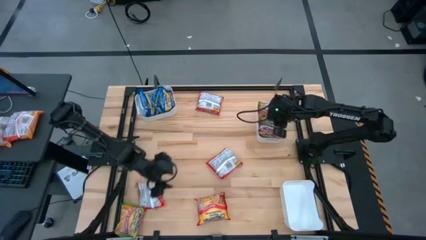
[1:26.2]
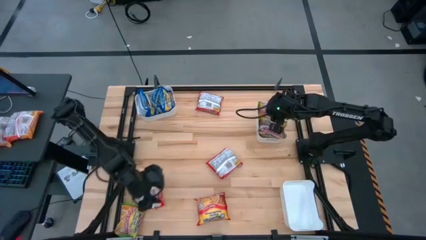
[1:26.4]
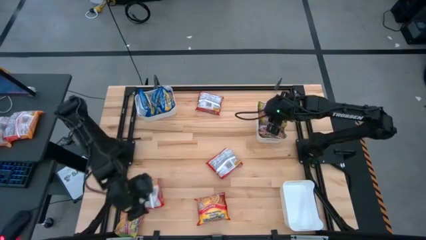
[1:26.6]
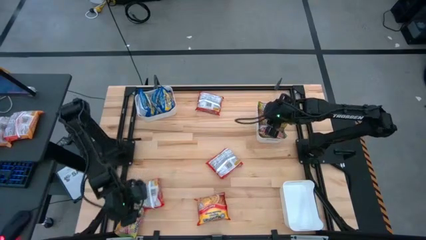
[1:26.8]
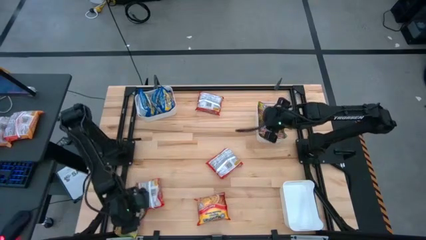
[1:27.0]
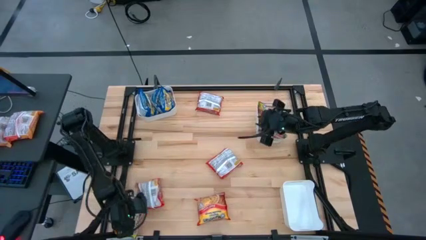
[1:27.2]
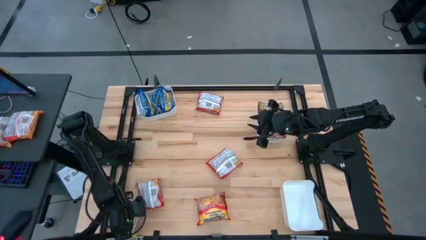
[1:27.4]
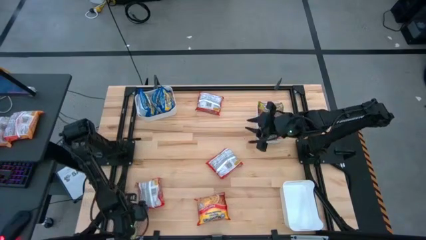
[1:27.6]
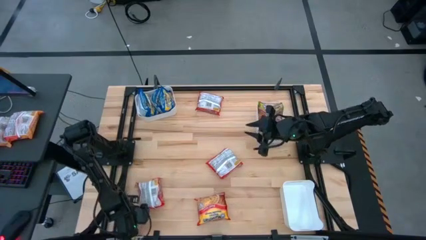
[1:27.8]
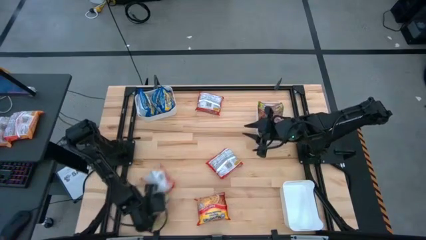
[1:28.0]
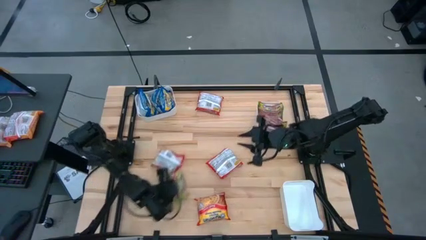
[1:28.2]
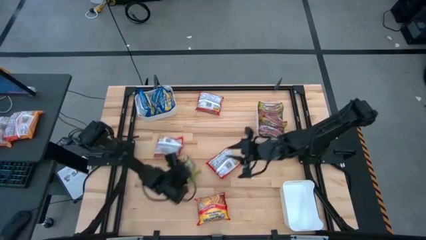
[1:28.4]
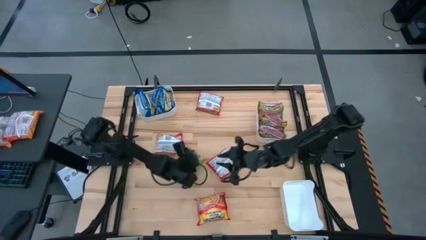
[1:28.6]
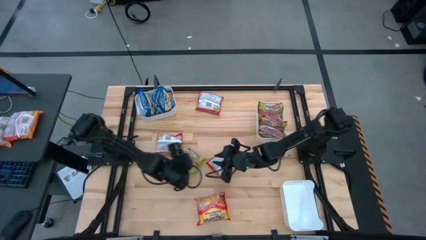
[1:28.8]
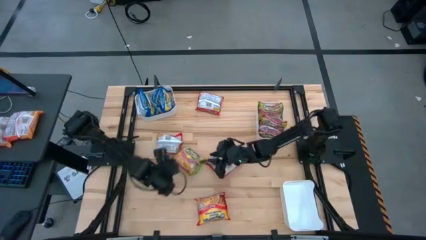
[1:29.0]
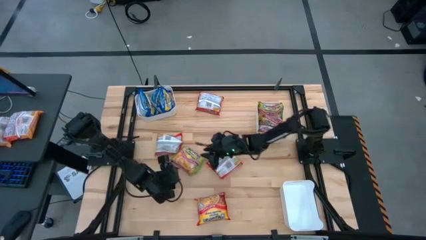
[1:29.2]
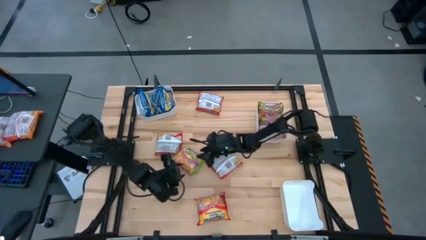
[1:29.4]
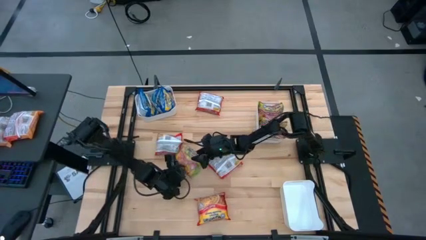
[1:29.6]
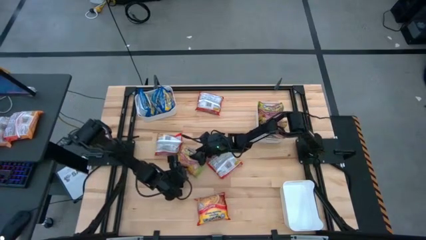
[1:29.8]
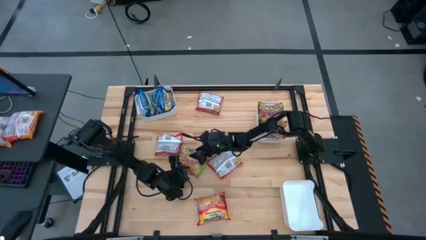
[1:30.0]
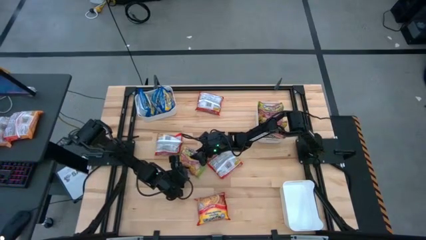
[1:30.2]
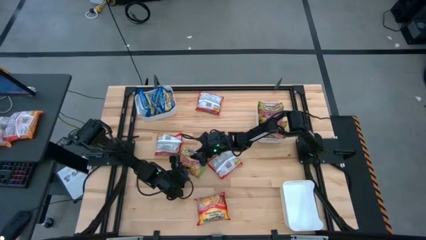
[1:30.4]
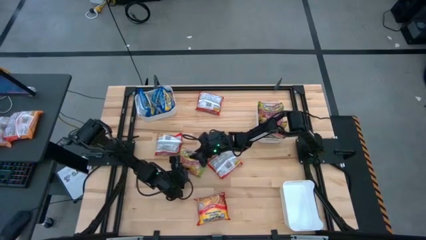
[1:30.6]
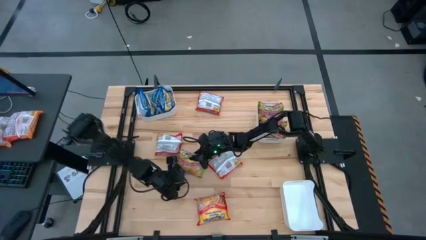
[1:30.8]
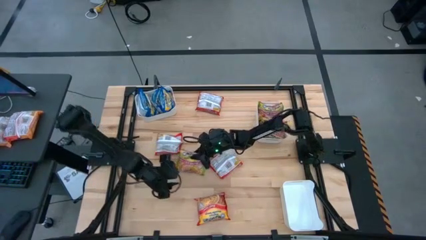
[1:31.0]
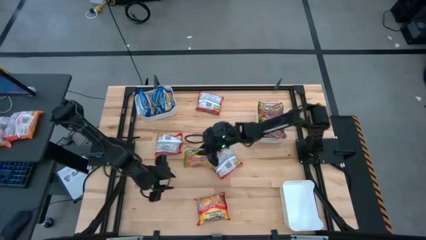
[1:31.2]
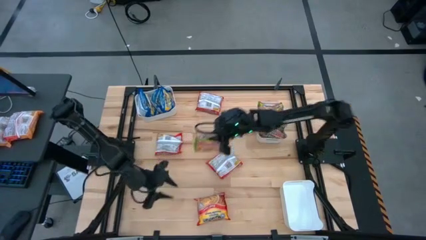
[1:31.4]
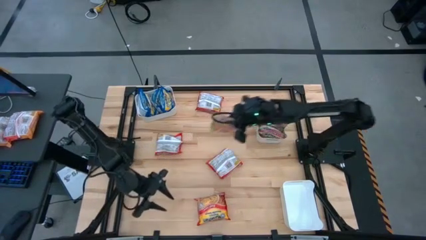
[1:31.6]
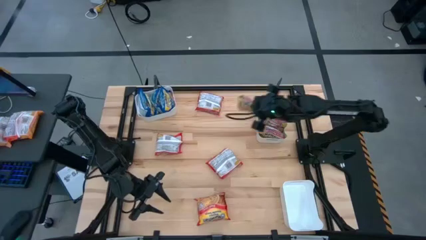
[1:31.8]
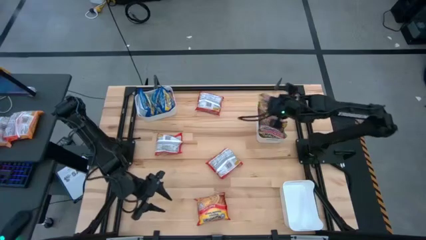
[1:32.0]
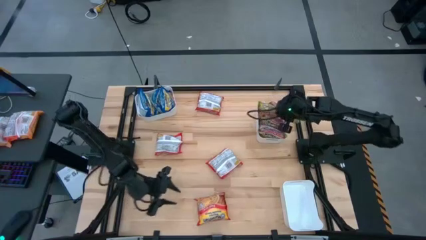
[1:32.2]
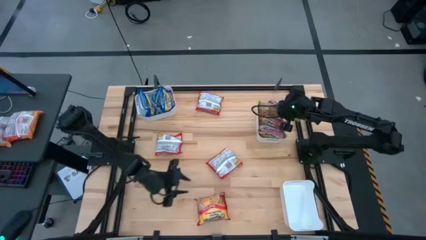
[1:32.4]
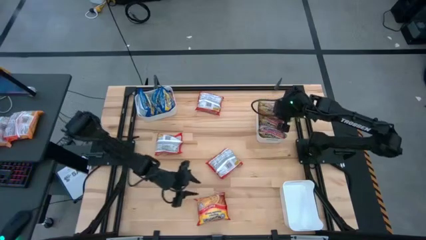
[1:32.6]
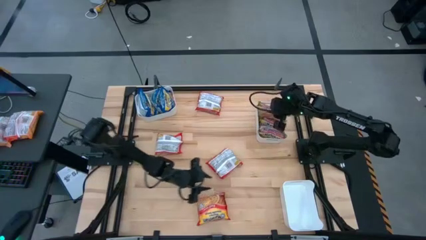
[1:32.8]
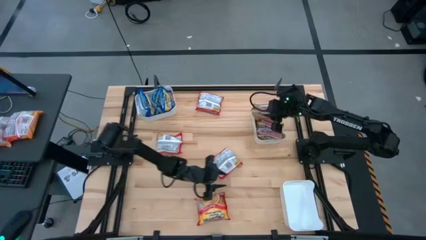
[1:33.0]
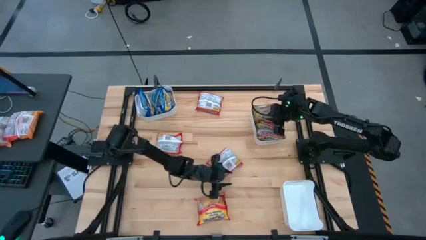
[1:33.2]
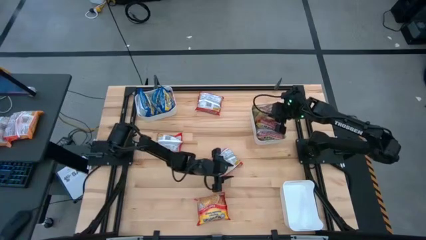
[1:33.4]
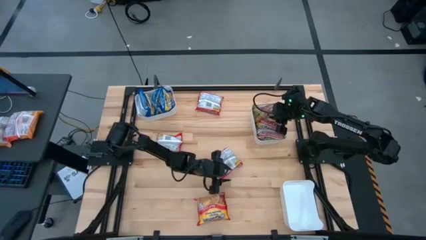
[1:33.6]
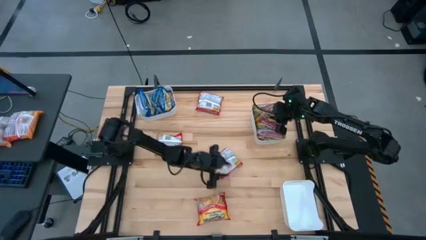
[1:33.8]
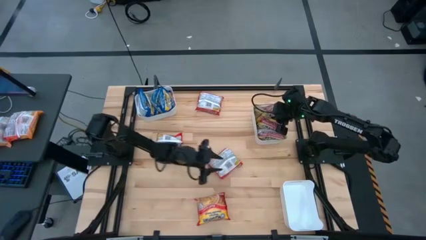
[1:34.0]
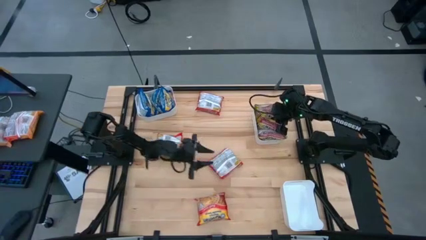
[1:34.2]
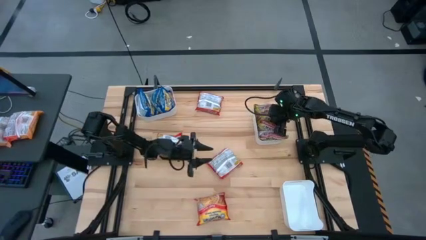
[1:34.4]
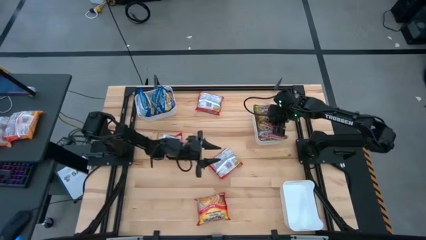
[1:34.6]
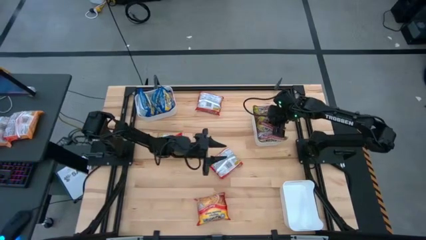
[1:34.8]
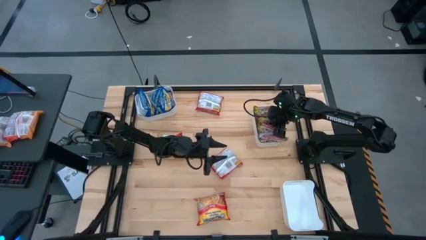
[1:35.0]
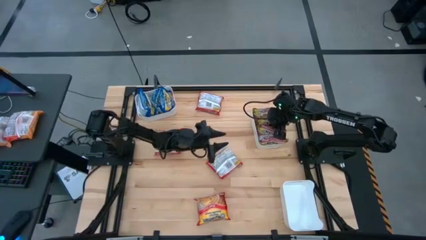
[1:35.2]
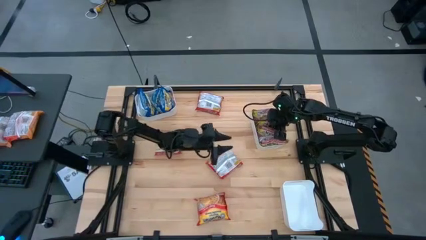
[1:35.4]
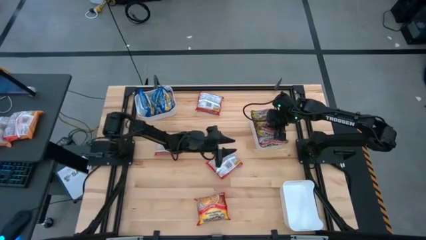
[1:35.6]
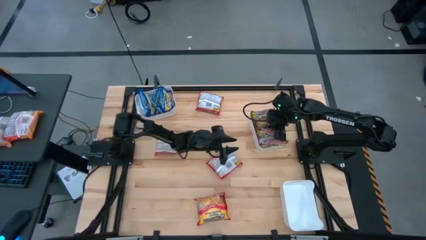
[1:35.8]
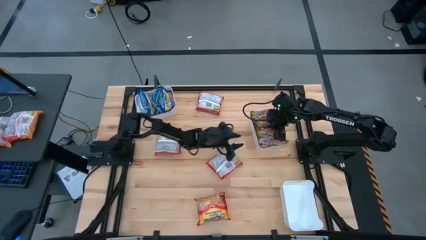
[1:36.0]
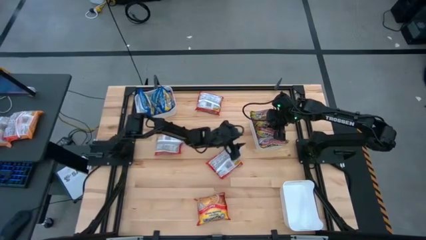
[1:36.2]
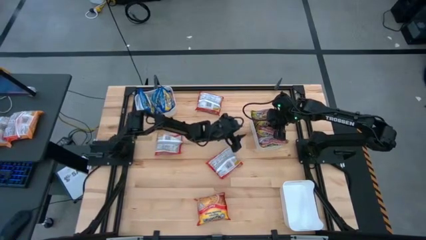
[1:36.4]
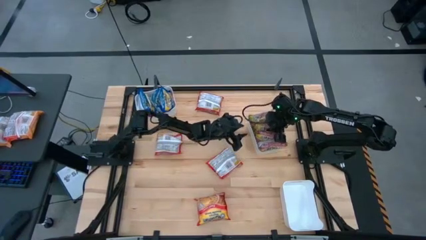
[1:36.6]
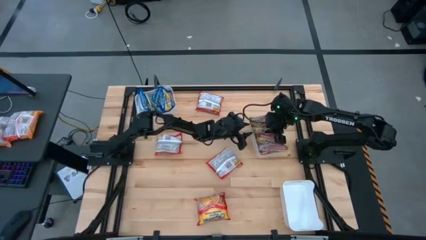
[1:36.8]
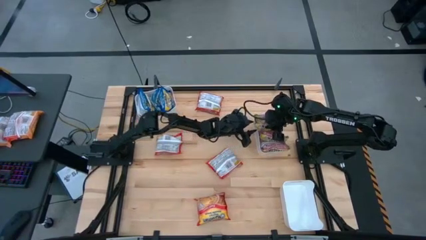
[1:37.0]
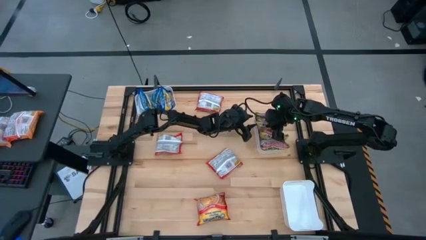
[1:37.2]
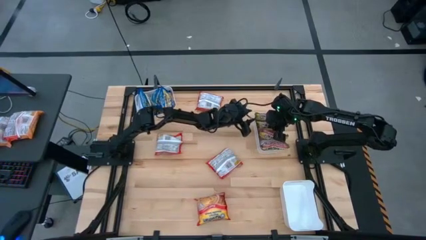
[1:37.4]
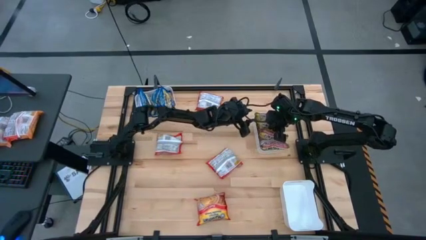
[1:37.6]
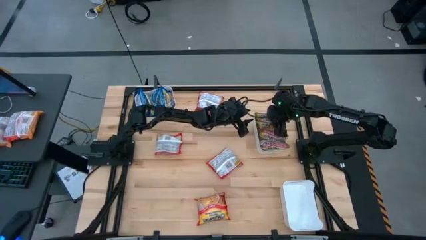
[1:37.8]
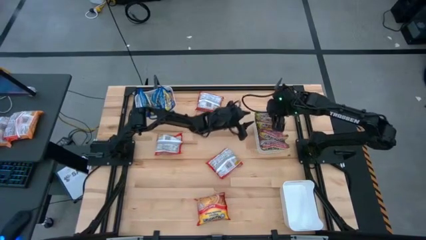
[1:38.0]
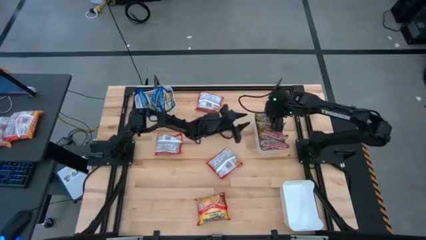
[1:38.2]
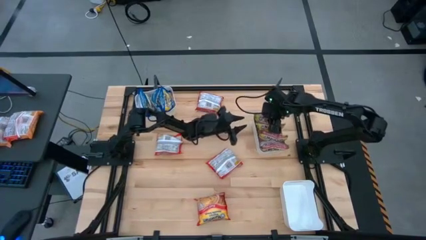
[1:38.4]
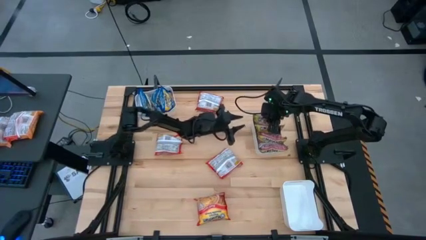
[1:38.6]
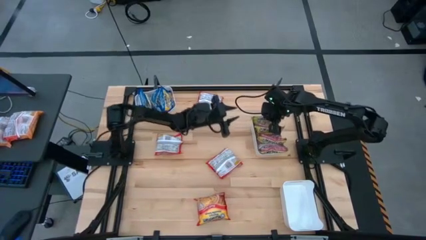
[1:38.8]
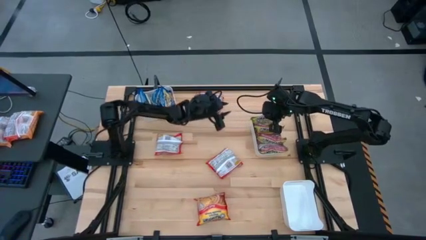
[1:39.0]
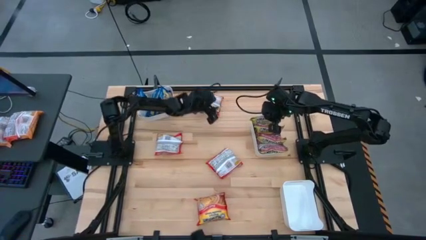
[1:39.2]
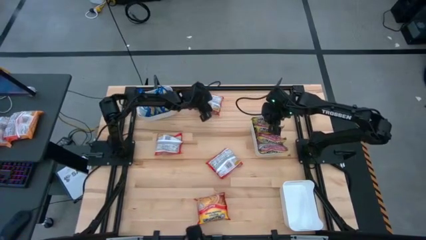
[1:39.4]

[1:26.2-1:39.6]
Task: Sort Maruchan noodles
Put the green noodle pack into the top right white bin
